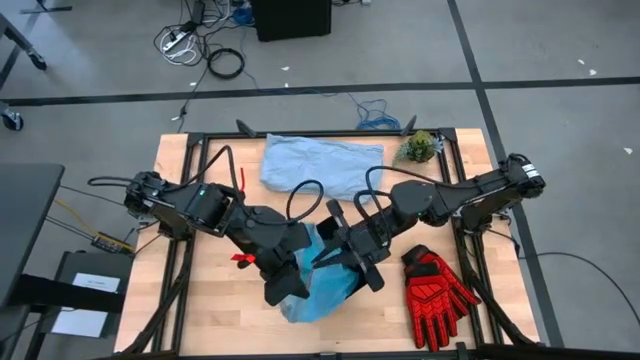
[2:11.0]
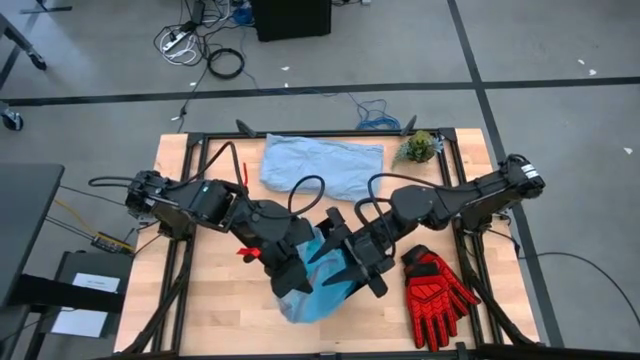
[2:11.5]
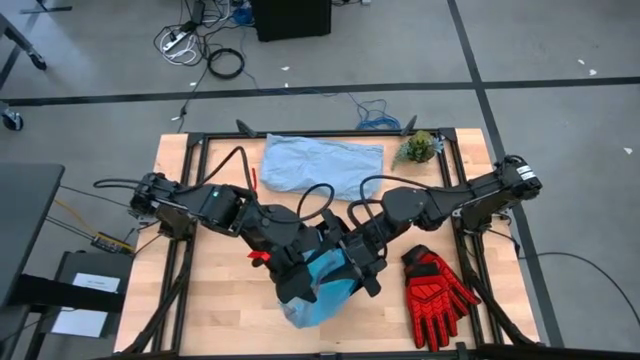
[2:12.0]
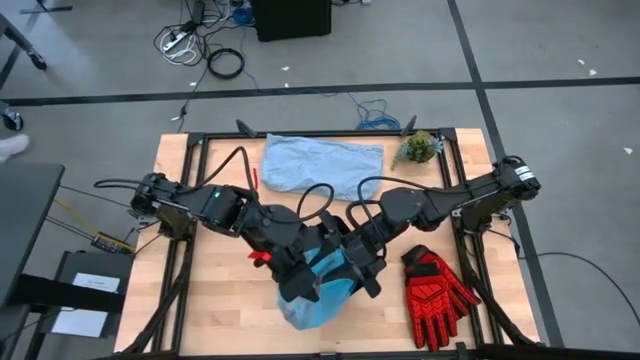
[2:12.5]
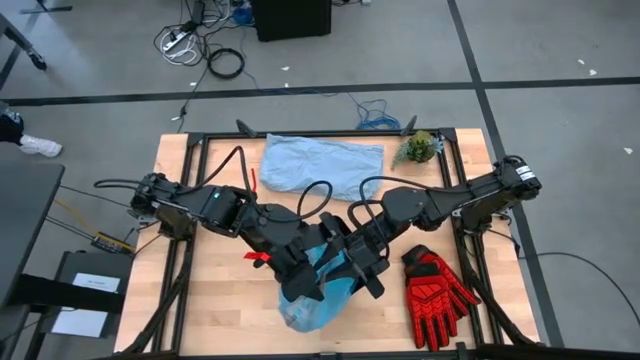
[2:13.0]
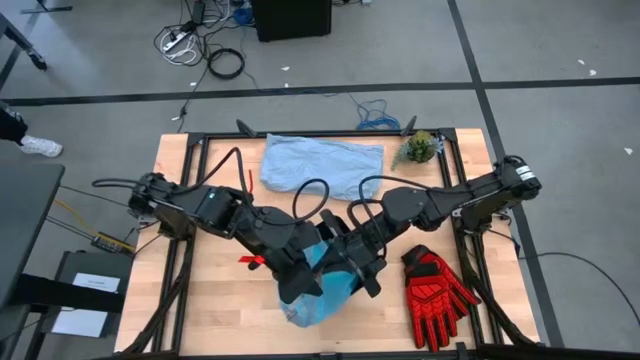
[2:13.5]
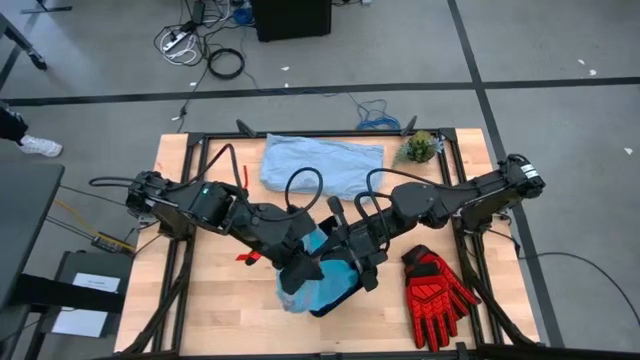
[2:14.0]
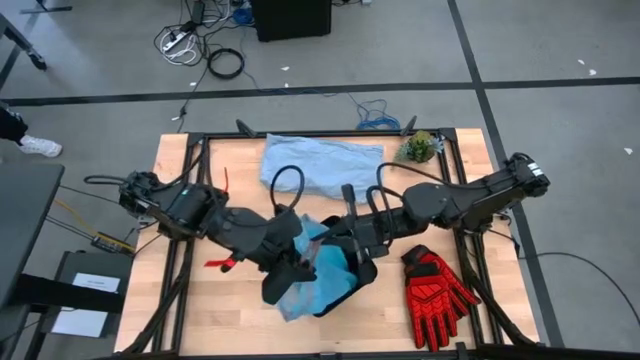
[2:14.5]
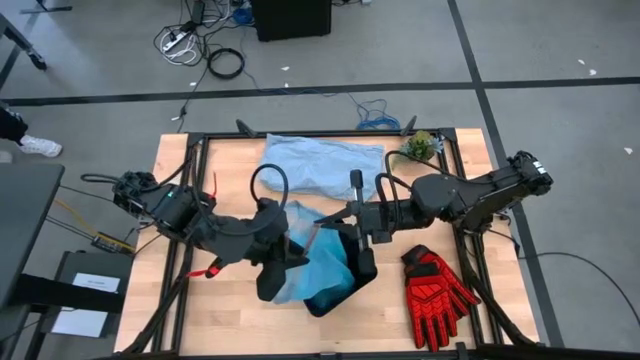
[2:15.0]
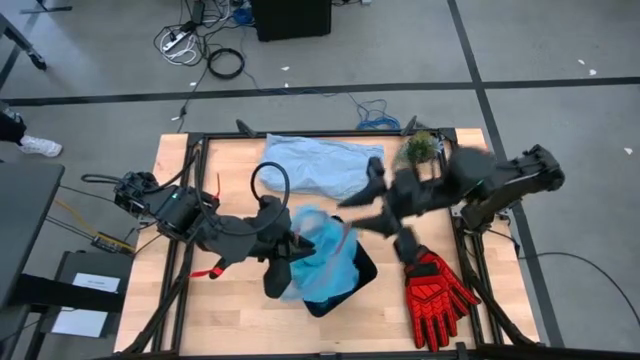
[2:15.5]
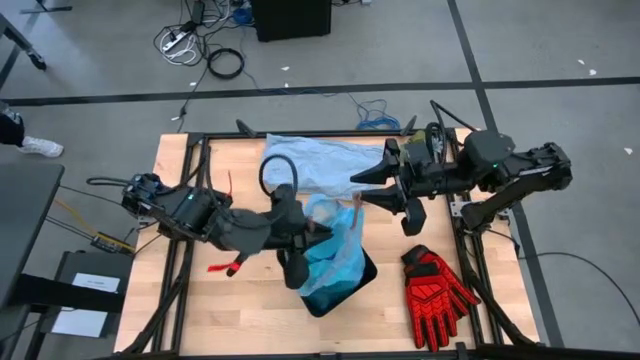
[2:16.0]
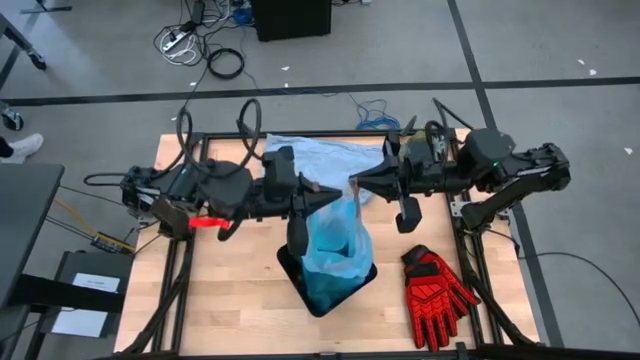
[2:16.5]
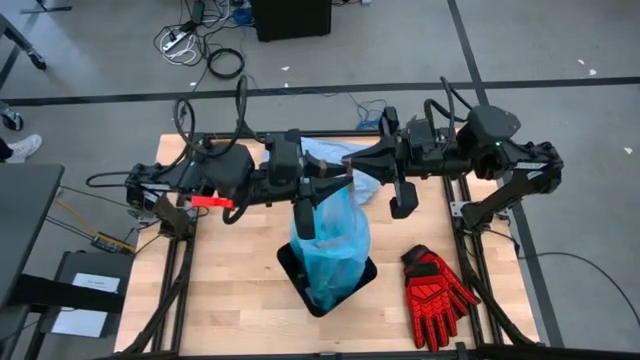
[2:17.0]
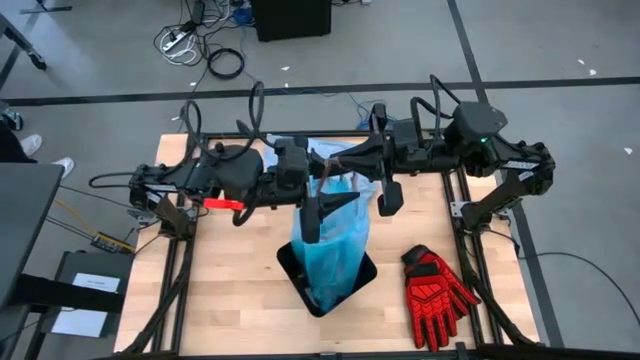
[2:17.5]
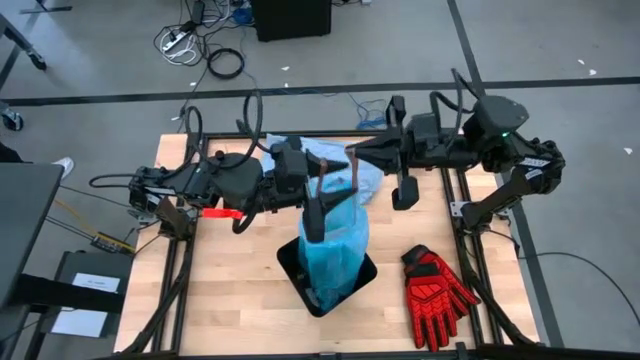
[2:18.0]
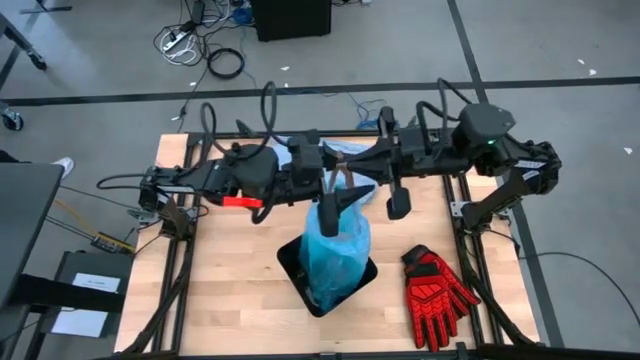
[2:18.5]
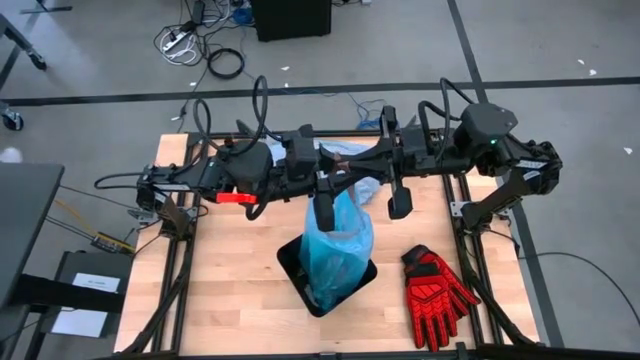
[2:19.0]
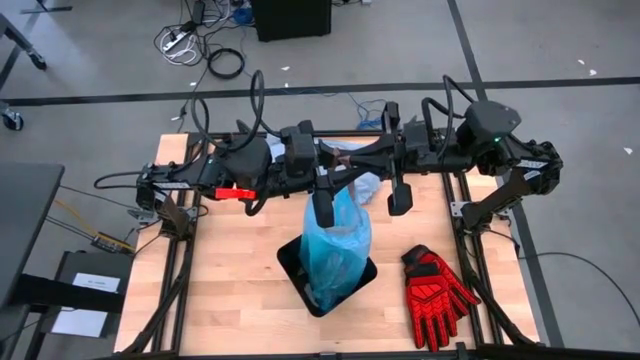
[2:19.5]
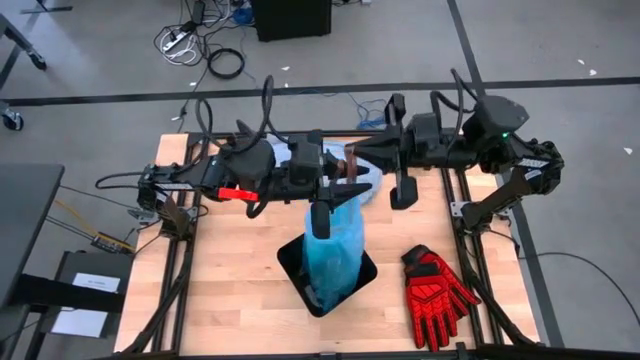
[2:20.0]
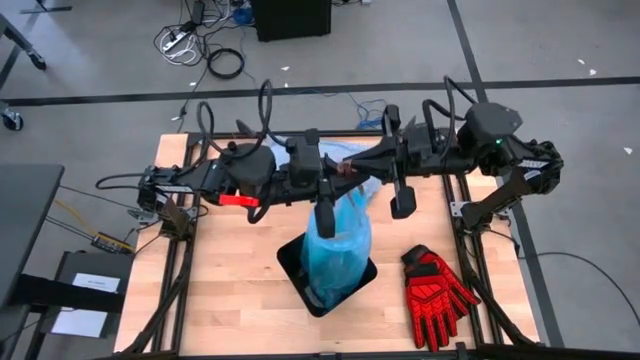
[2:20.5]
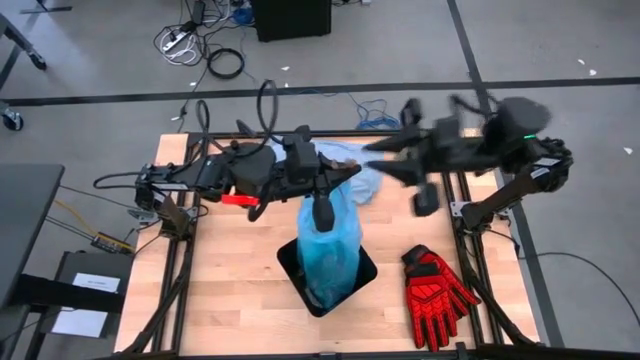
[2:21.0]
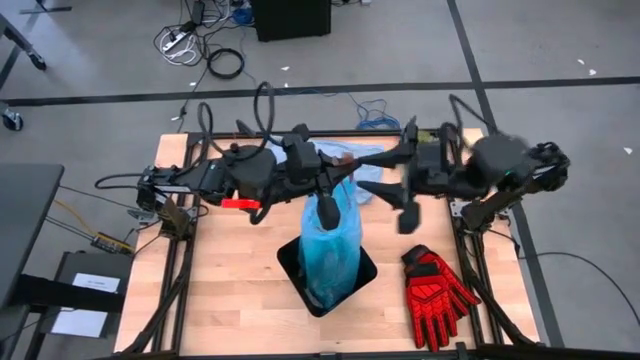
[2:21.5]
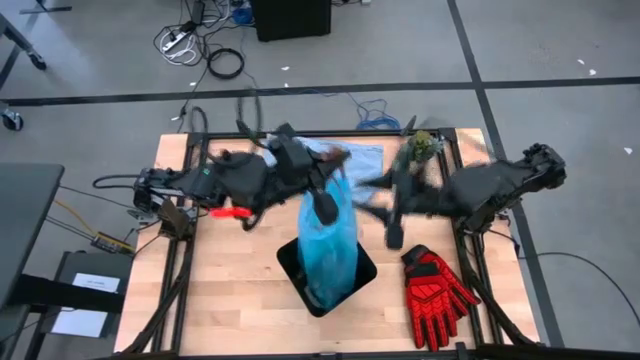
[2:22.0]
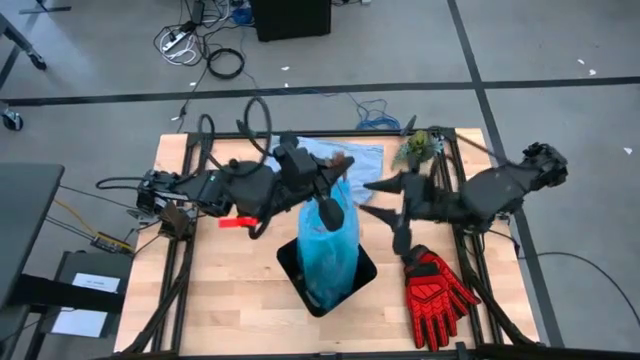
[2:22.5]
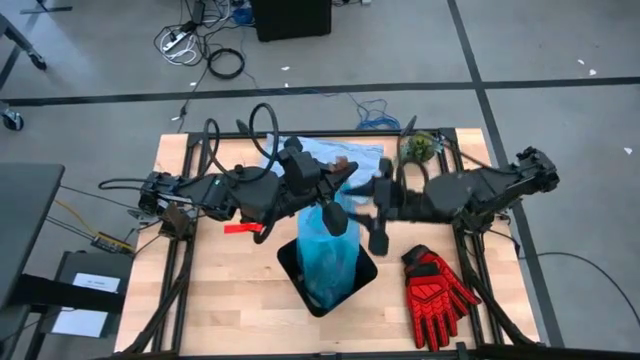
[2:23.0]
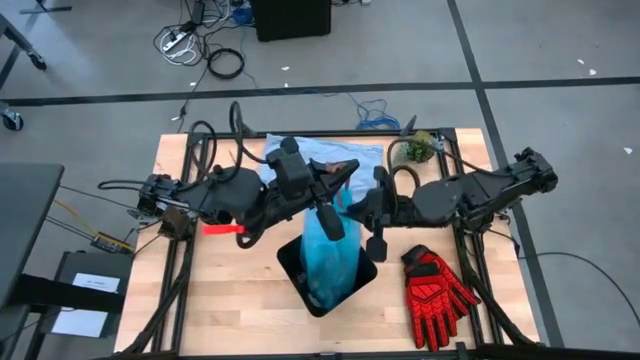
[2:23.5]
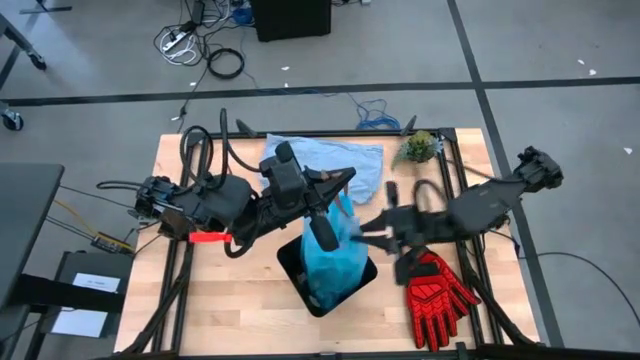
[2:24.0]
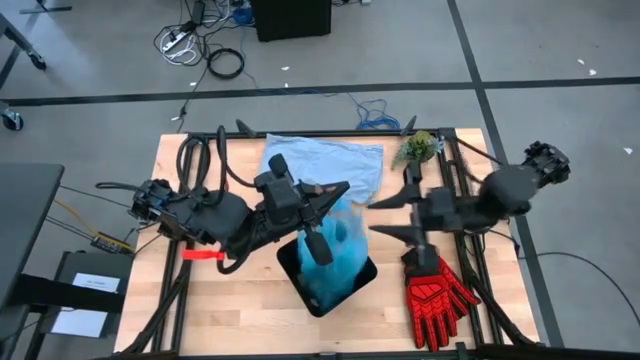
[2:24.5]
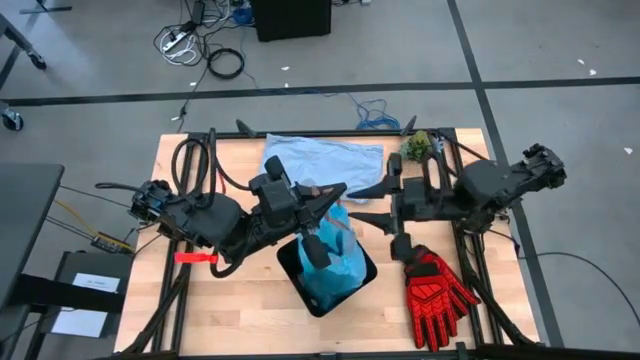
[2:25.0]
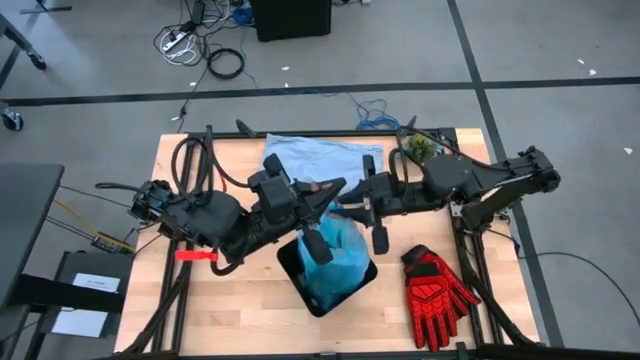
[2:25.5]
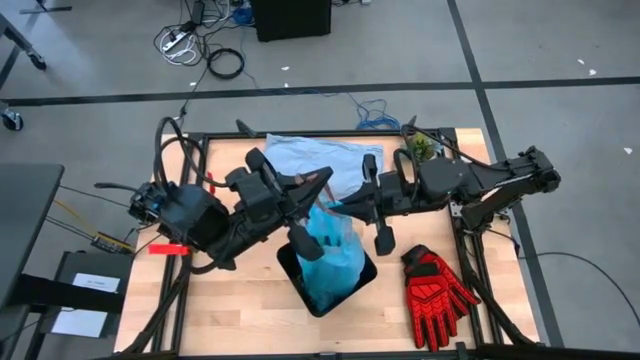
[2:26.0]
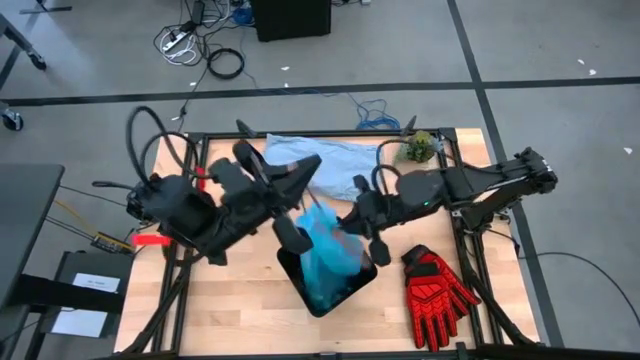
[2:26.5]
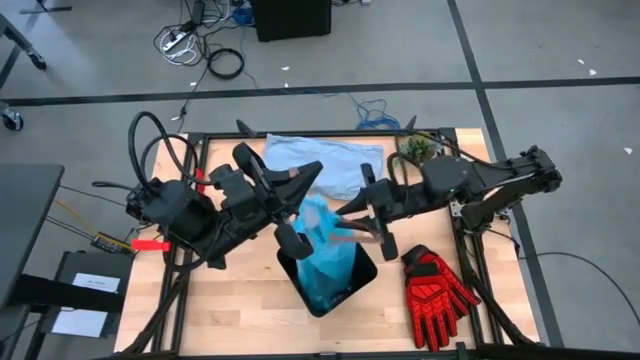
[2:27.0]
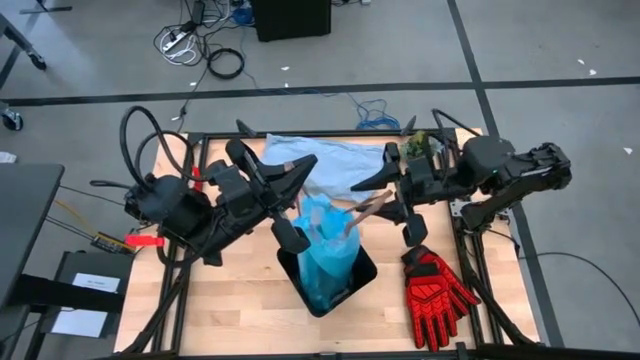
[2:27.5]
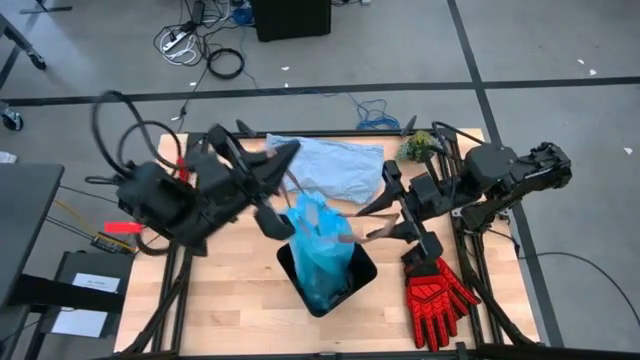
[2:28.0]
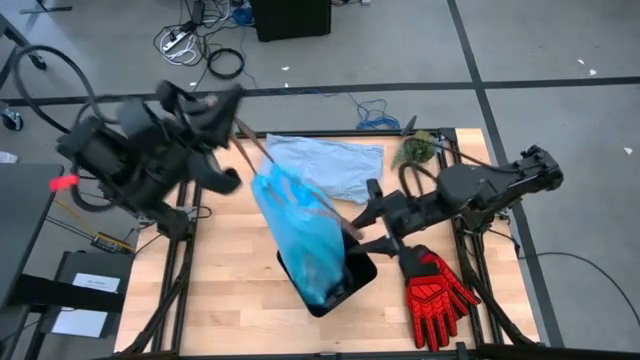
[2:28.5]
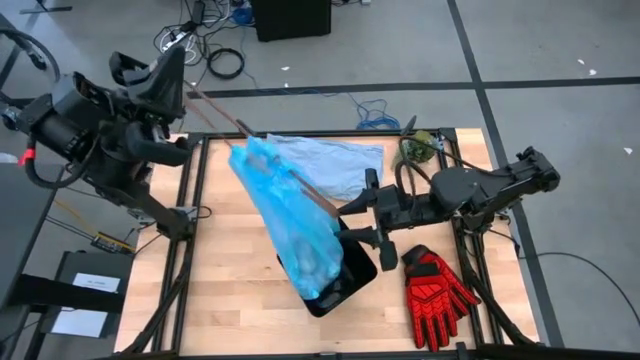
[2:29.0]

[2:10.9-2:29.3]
Task: place trash/remove bag and relplace
Close the light blue trash bag

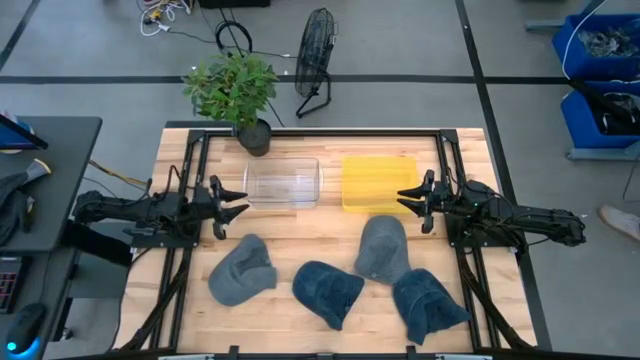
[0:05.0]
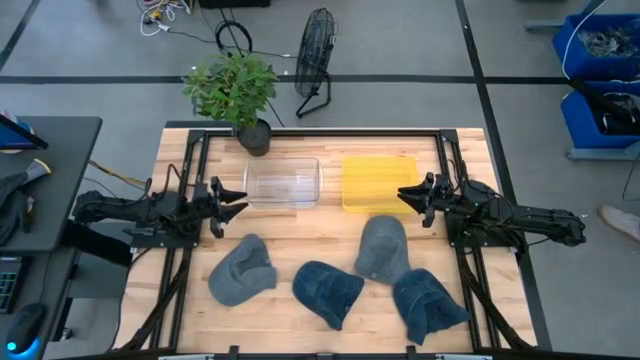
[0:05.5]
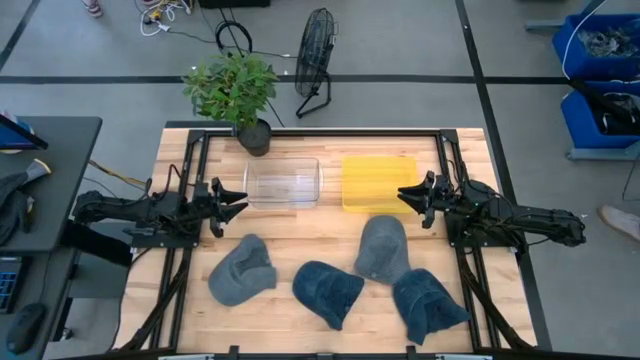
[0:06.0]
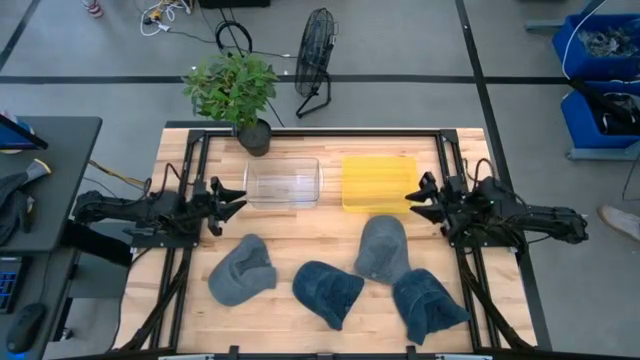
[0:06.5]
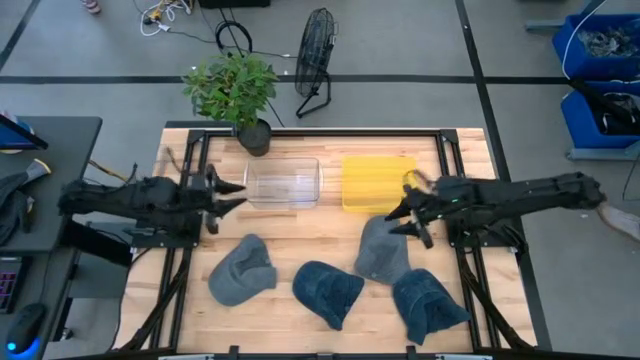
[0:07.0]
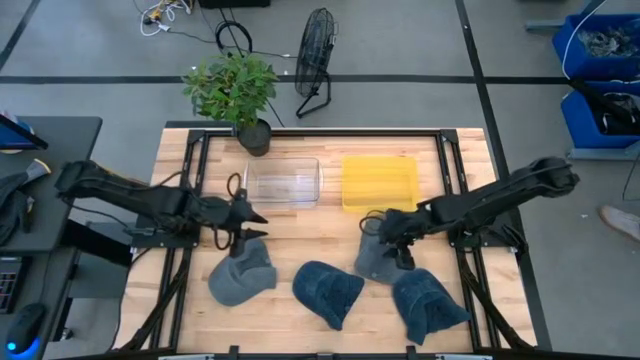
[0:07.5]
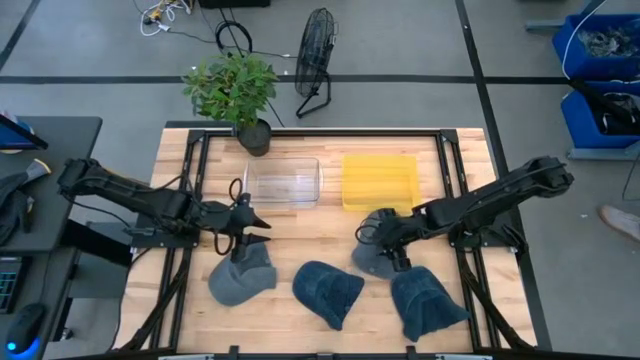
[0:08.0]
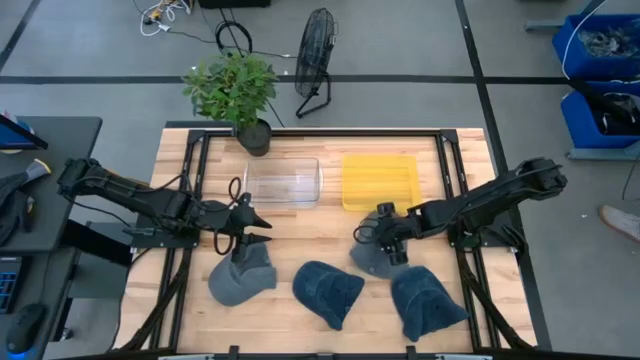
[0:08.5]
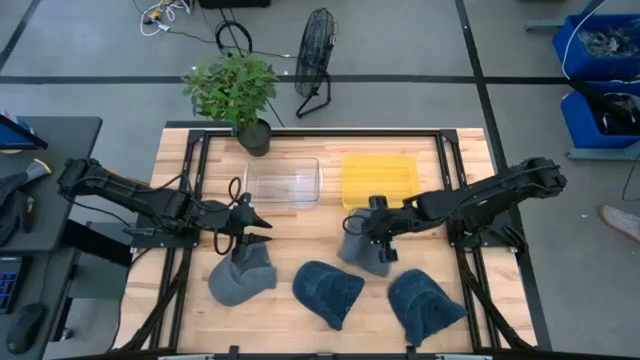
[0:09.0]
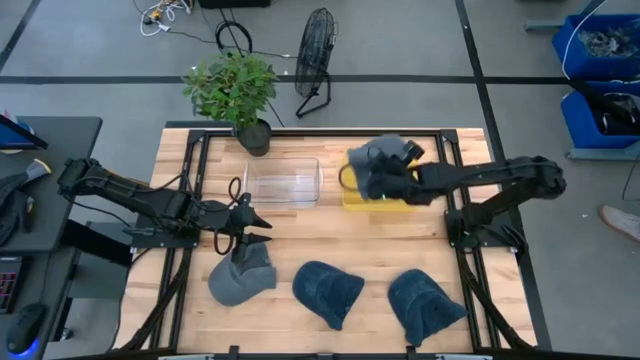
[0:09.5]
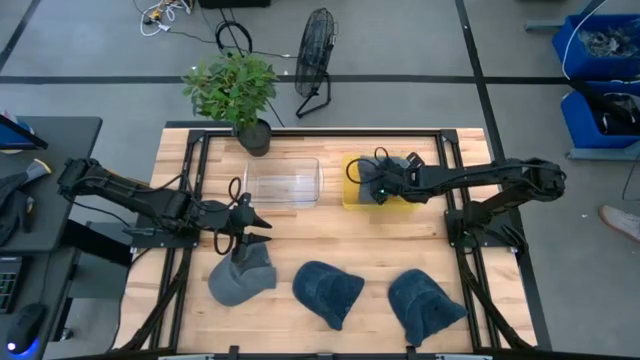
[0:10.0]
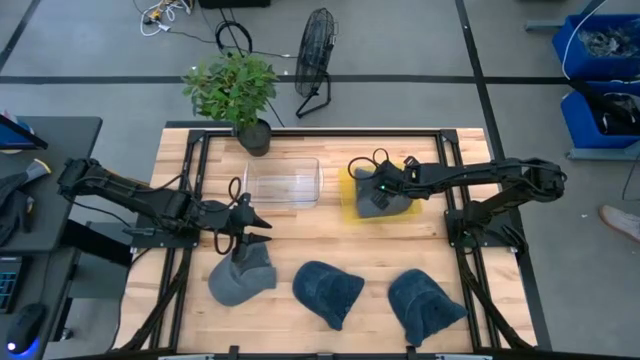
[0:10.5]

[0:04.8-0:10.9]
Task: Pick & Place hat
Put the right gray cap into the yellow bin
